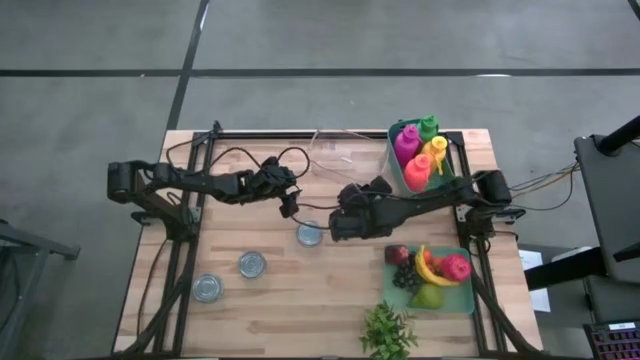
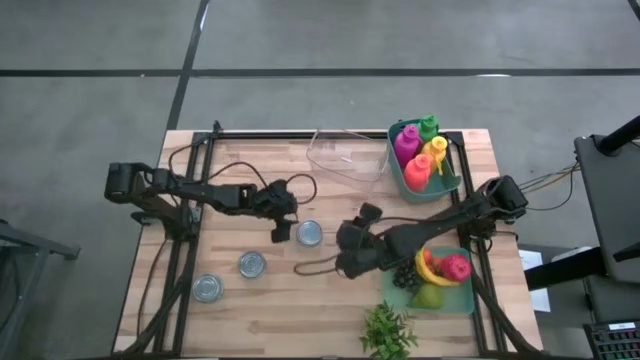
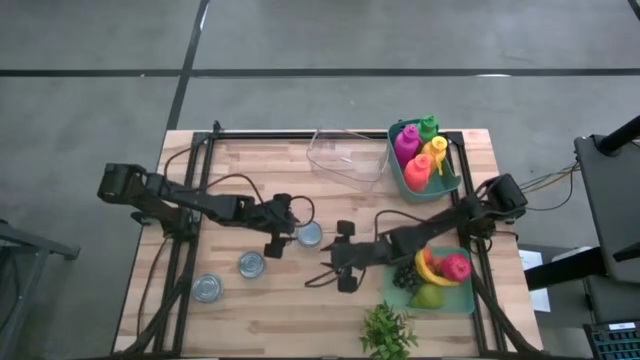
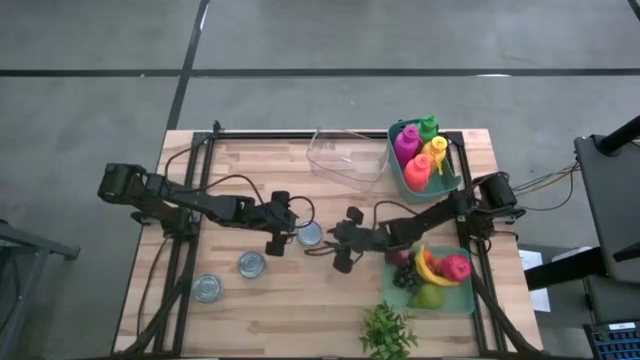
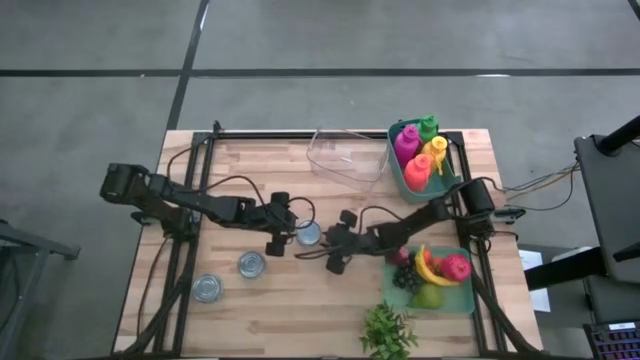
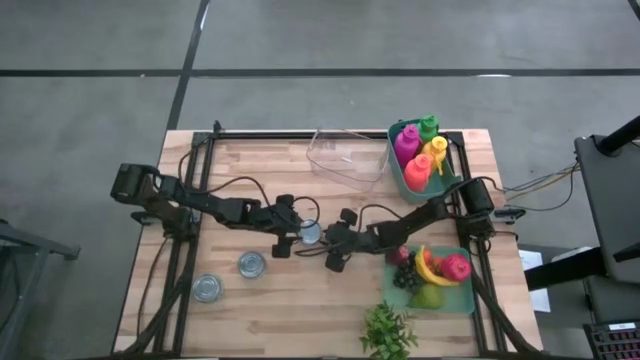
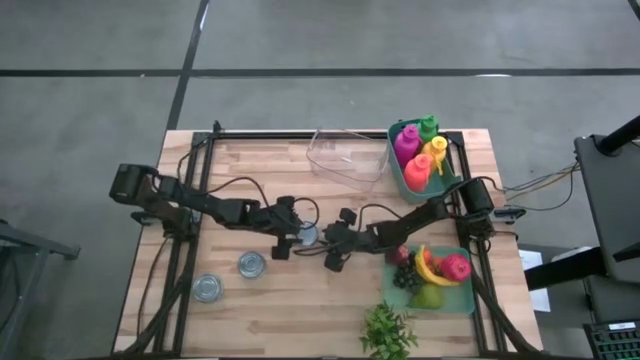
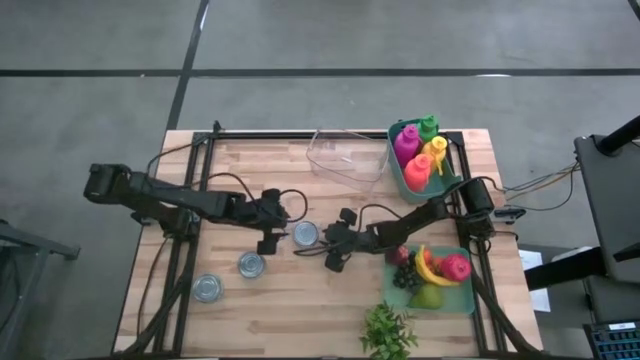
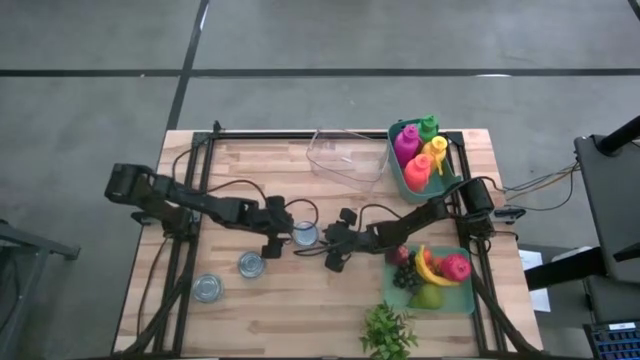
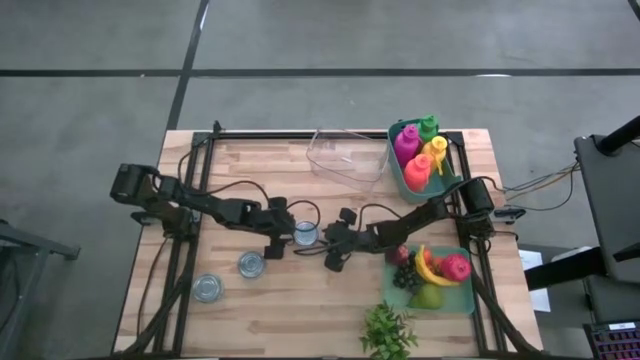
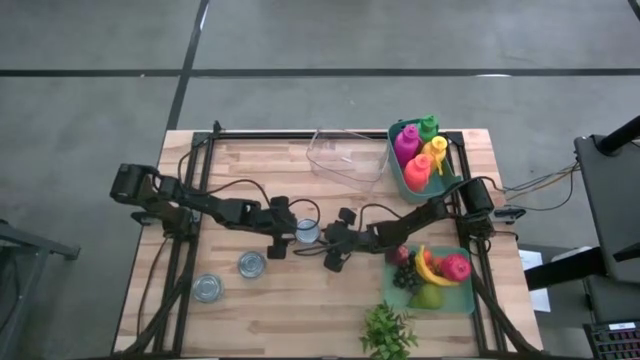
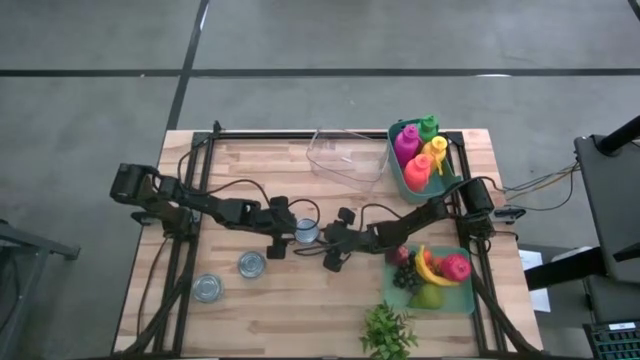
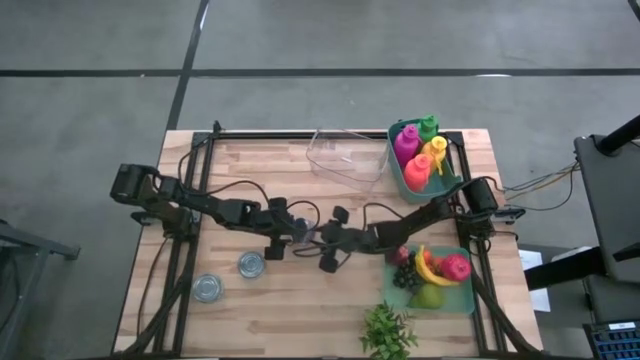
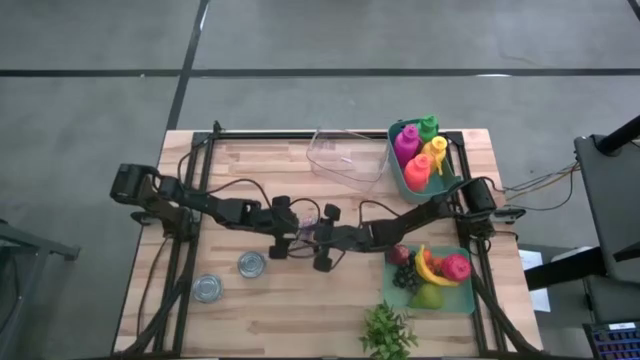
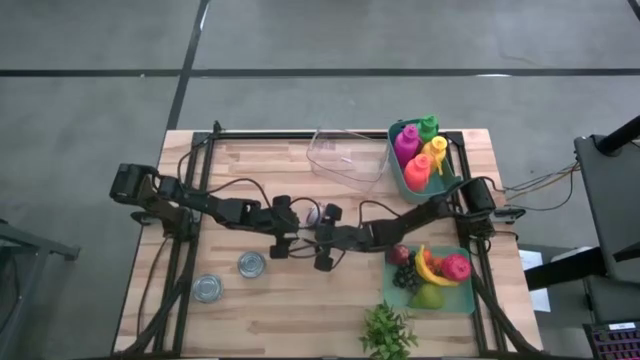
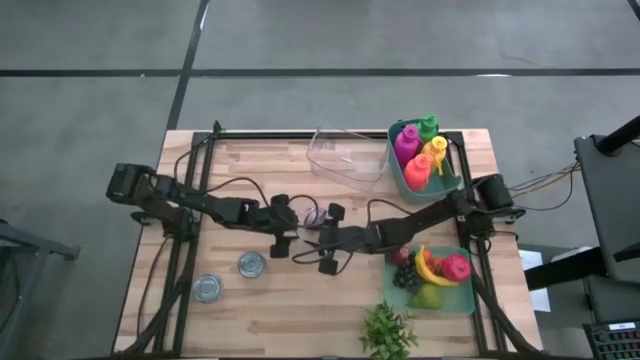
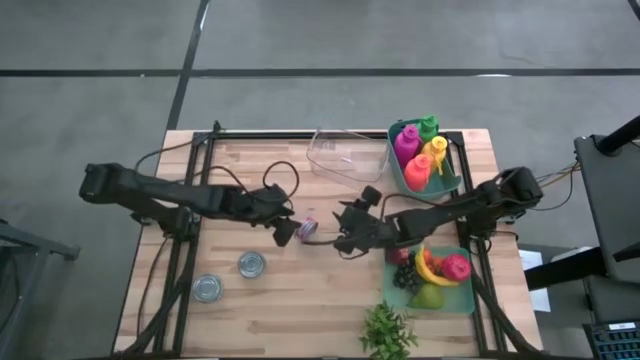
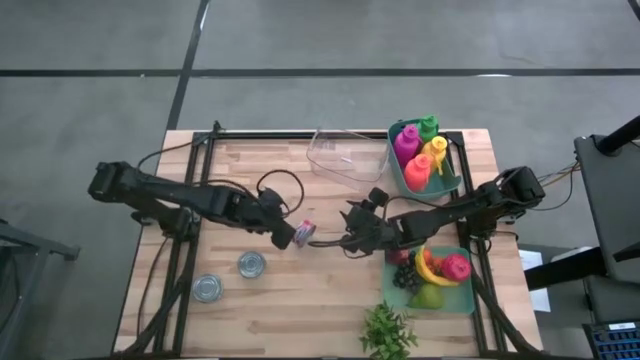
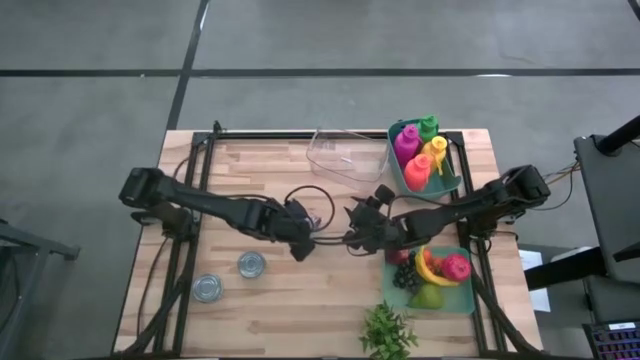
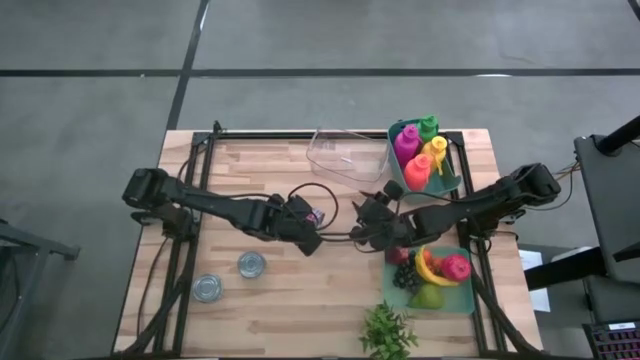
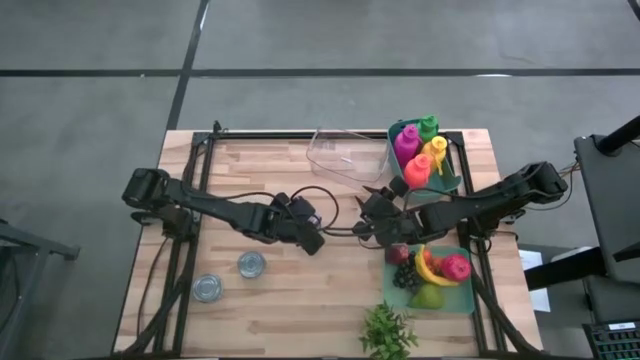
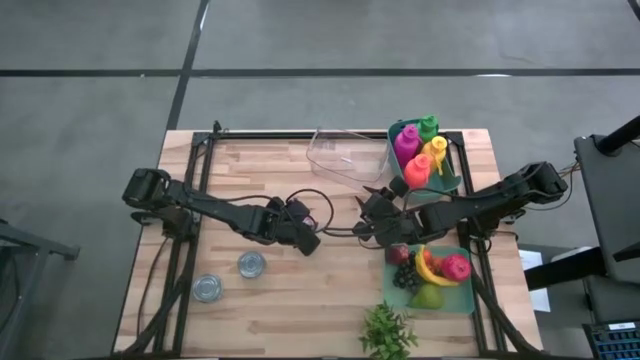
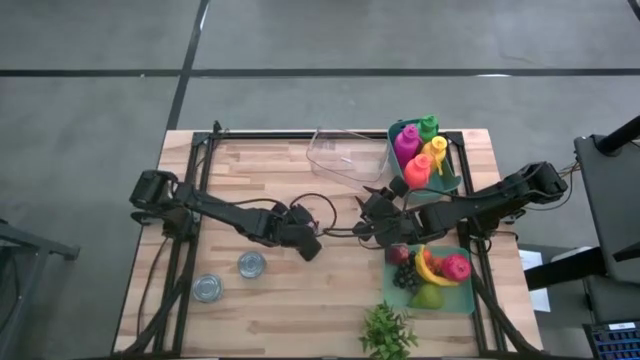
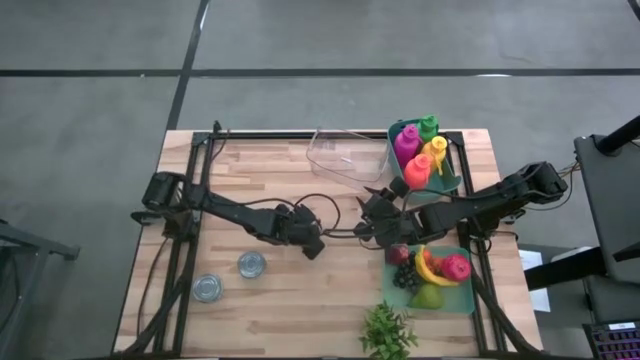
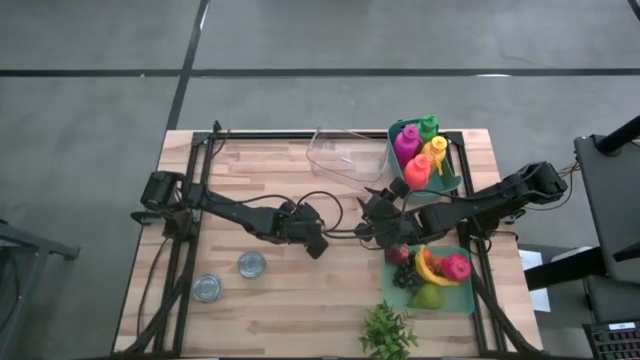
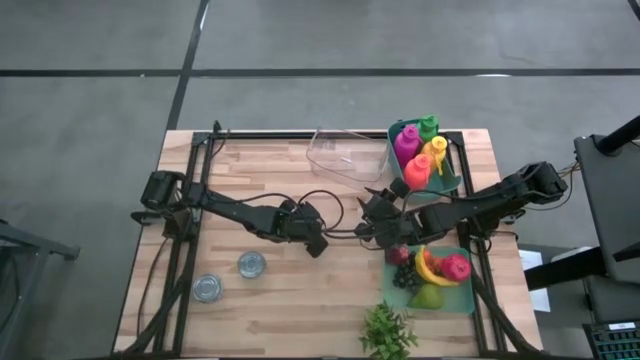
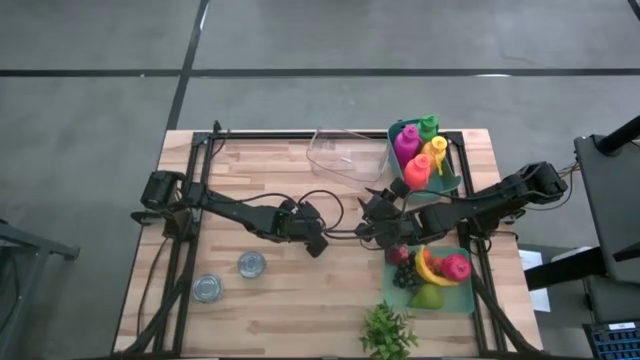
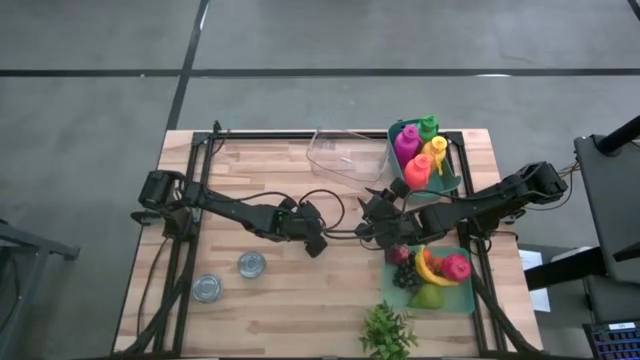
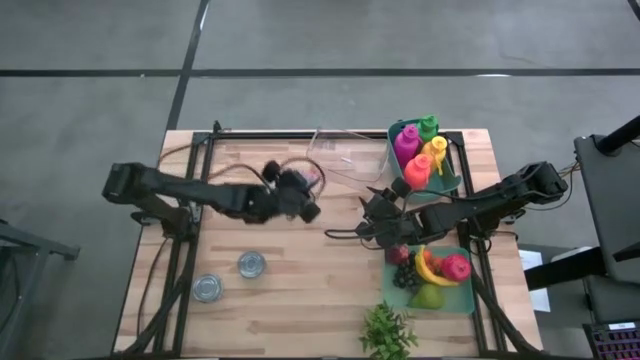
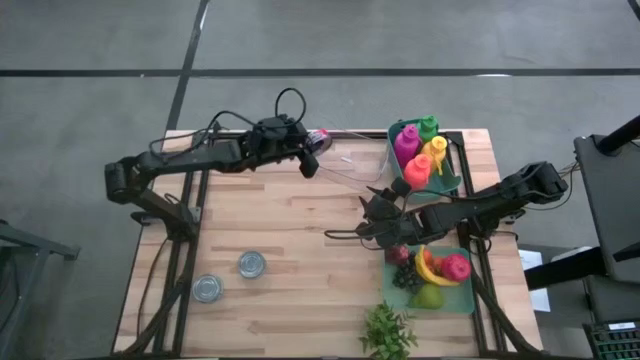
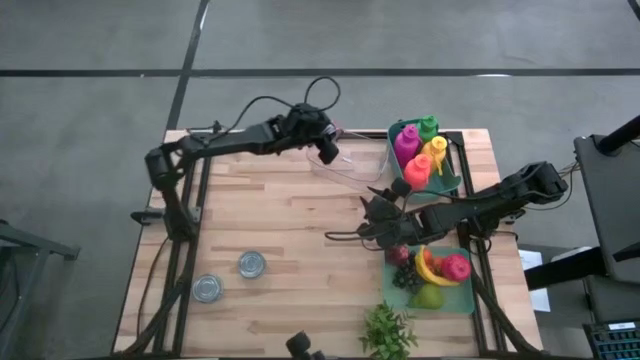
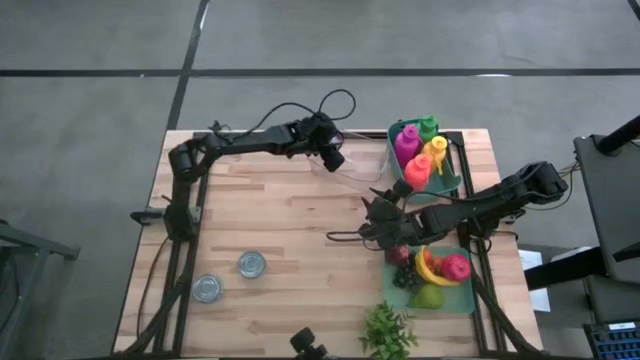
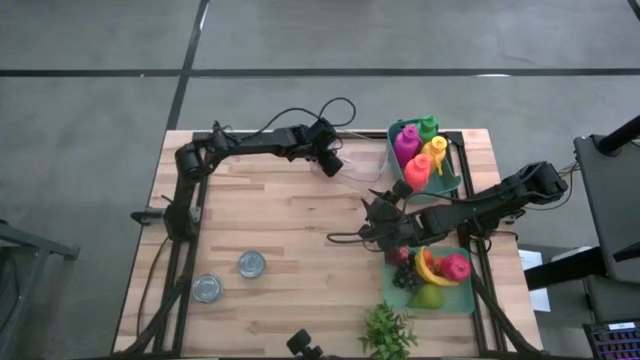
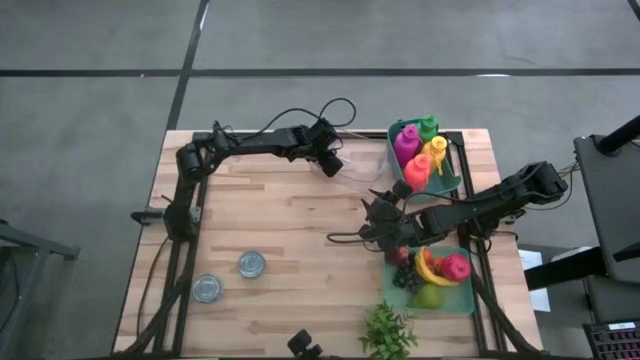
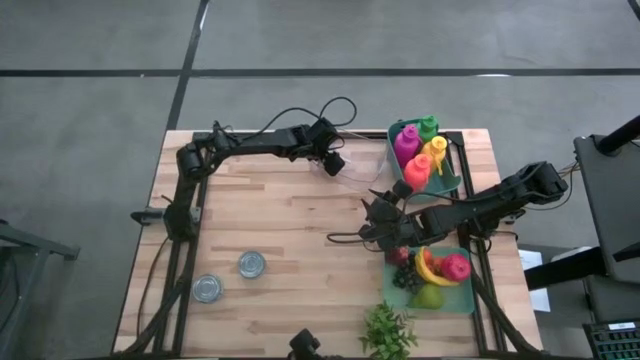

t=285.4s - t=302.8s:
Task: Pick & Place Food Item
Put the red tuna can into the transparent bin

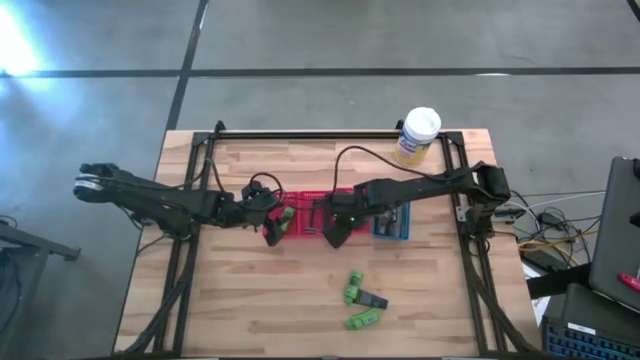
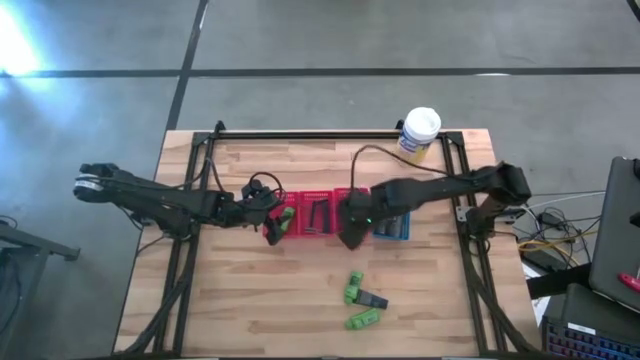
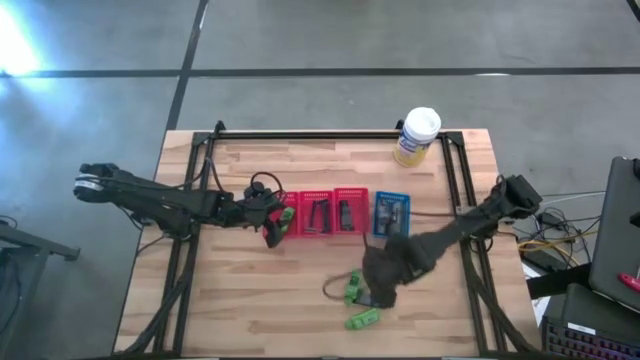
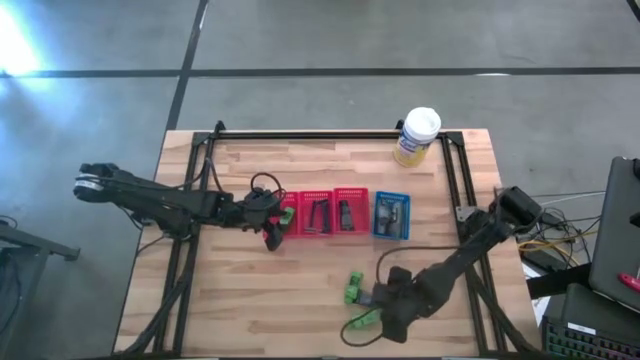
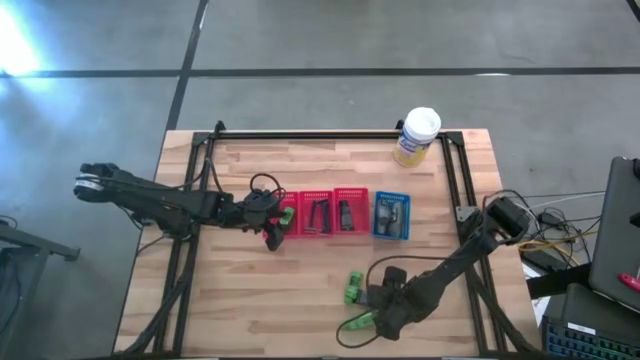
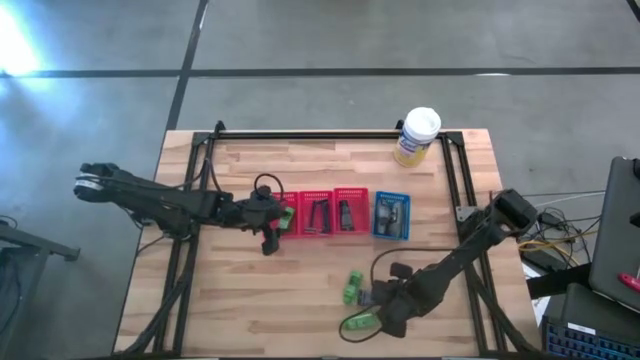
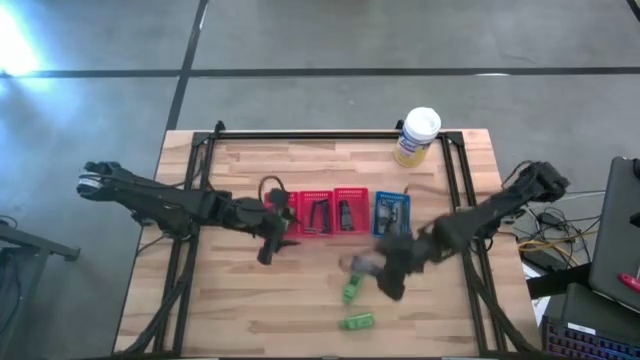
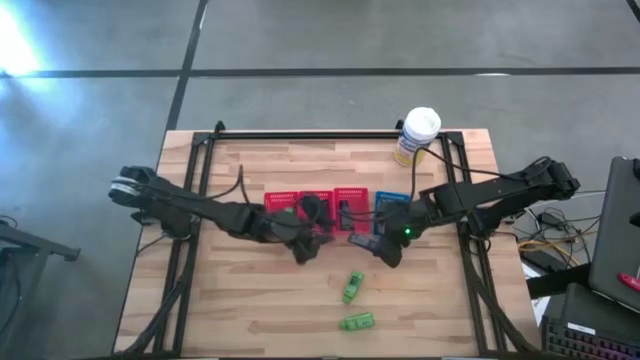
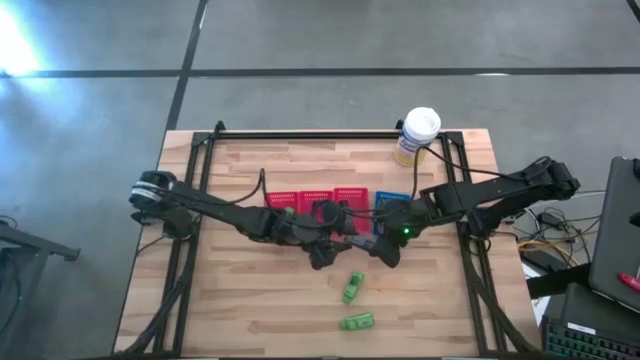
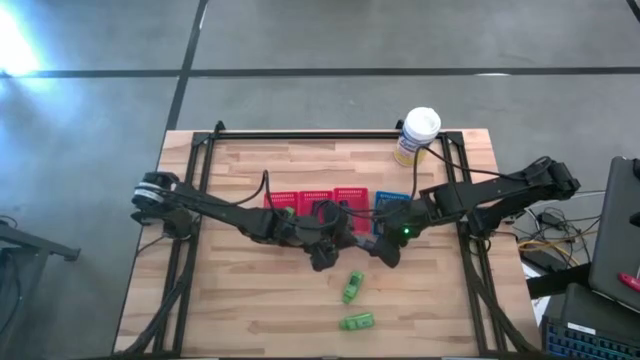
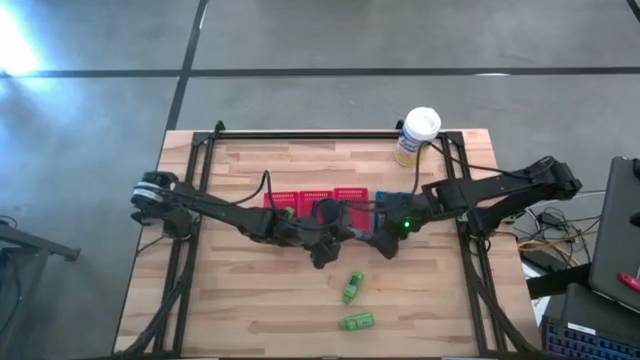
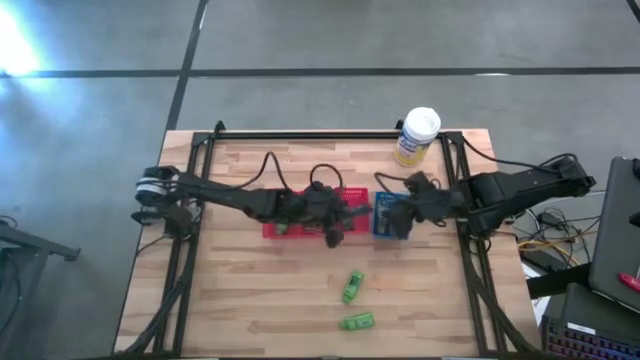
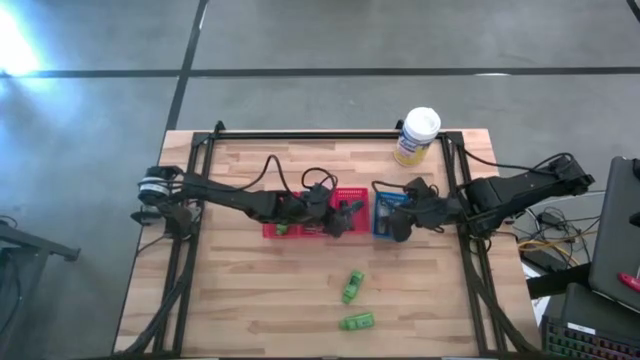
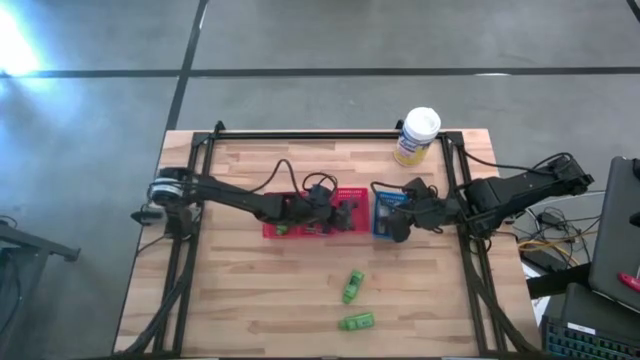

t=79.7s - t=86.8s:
Task: Pick & Place Travel size toiletries
Put the blue shave cream into the right red bin
